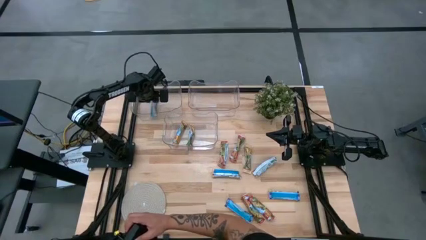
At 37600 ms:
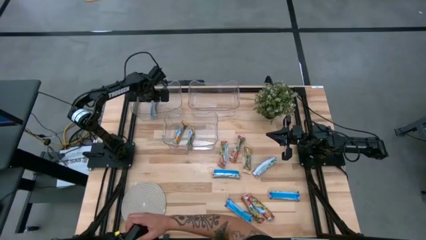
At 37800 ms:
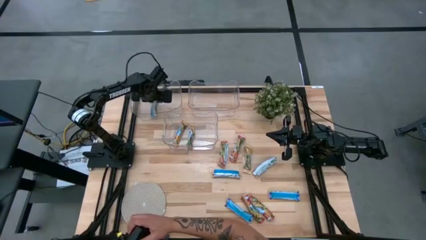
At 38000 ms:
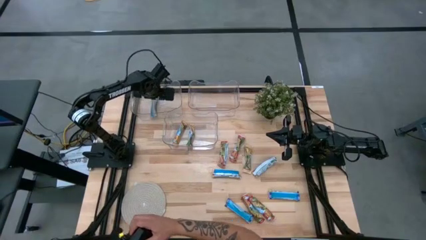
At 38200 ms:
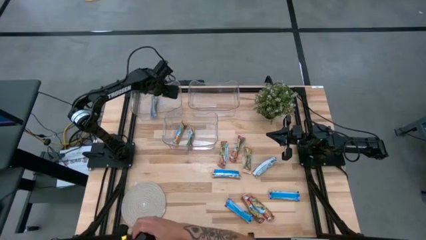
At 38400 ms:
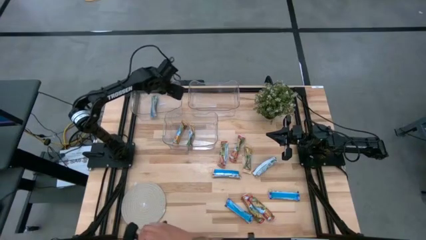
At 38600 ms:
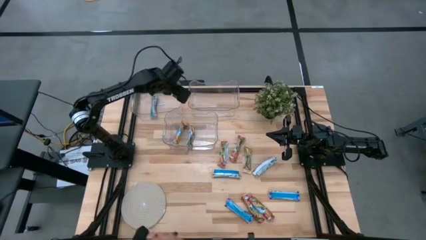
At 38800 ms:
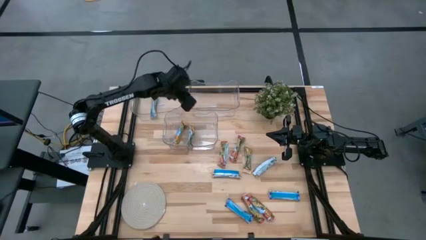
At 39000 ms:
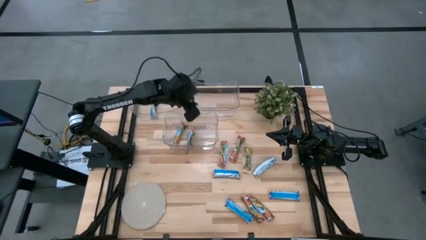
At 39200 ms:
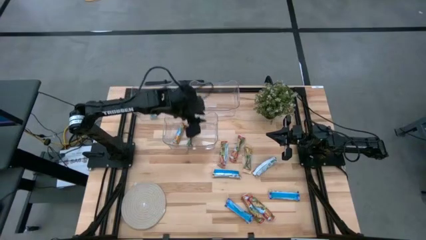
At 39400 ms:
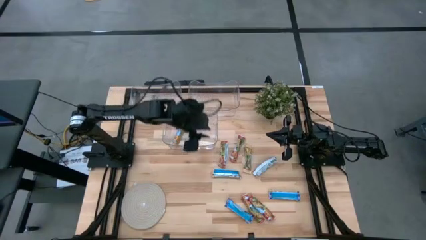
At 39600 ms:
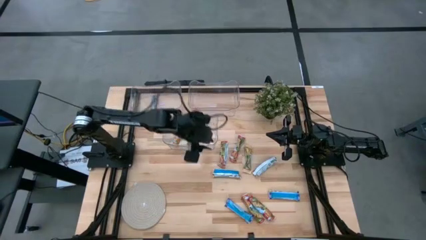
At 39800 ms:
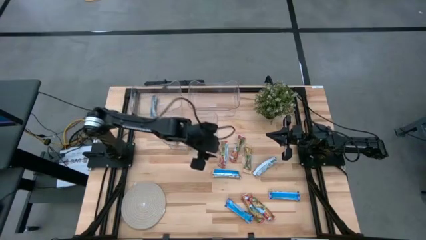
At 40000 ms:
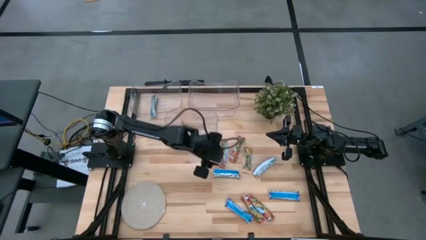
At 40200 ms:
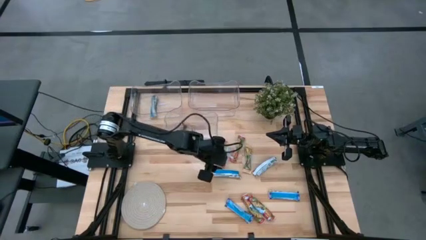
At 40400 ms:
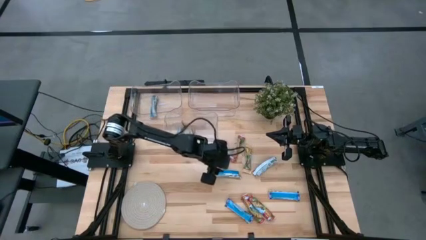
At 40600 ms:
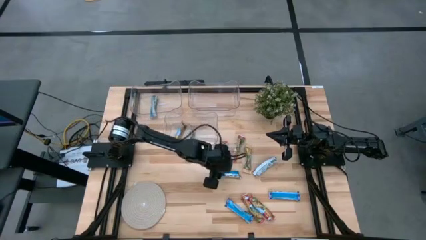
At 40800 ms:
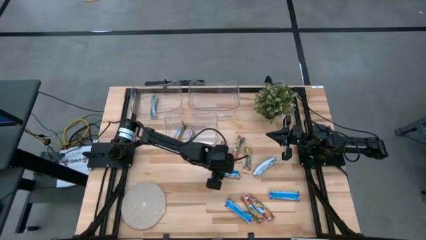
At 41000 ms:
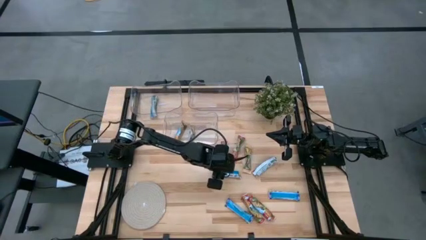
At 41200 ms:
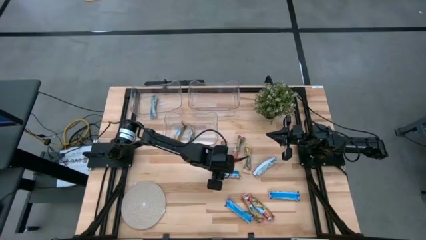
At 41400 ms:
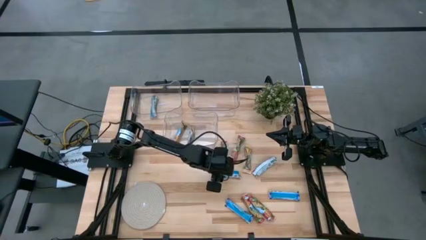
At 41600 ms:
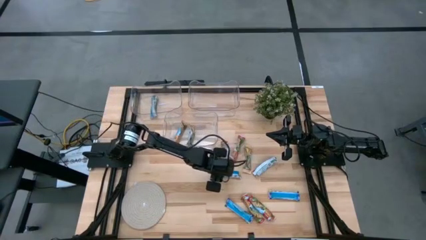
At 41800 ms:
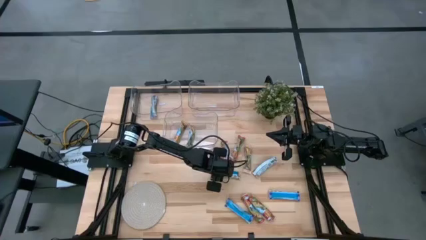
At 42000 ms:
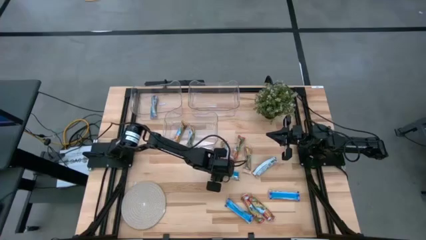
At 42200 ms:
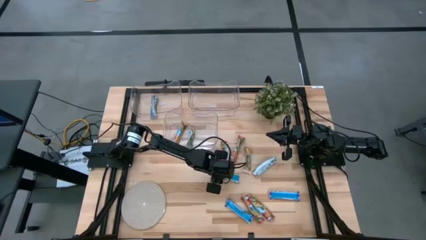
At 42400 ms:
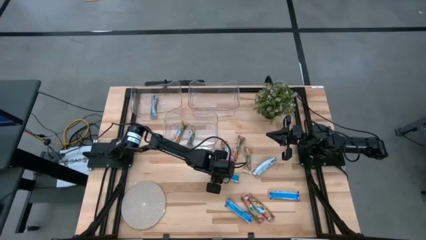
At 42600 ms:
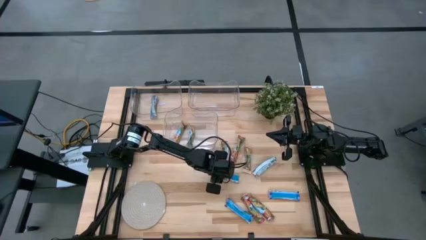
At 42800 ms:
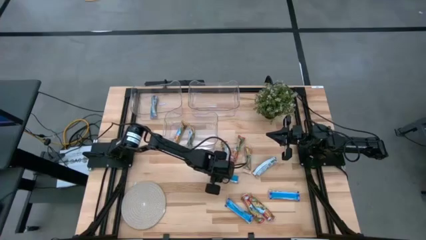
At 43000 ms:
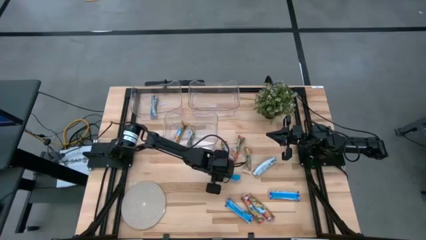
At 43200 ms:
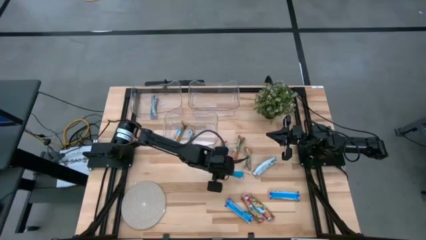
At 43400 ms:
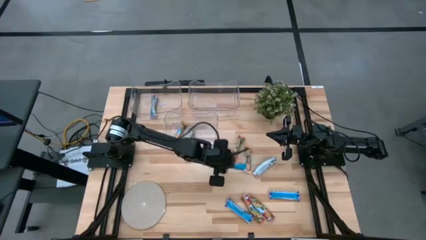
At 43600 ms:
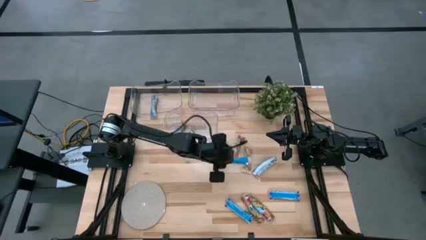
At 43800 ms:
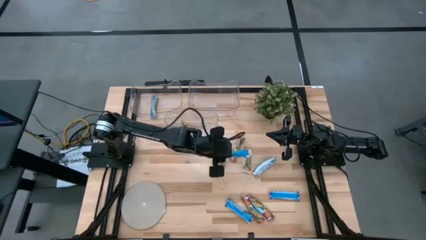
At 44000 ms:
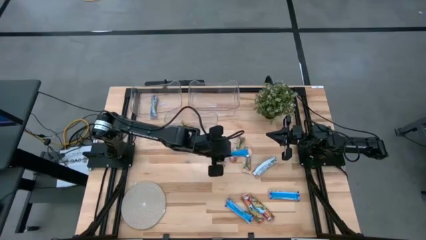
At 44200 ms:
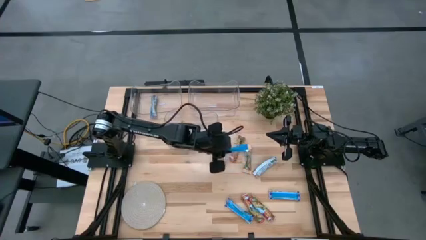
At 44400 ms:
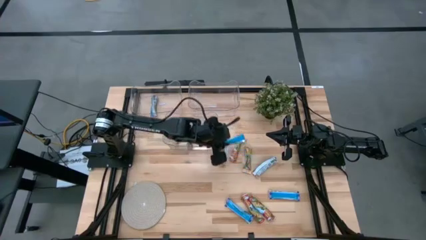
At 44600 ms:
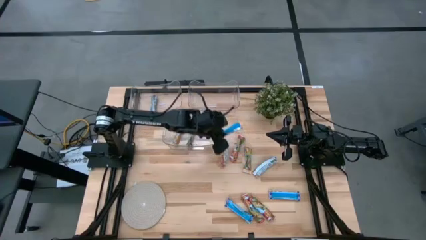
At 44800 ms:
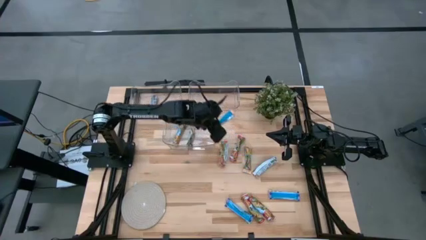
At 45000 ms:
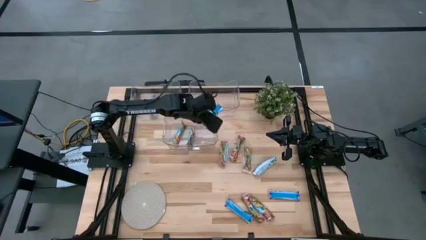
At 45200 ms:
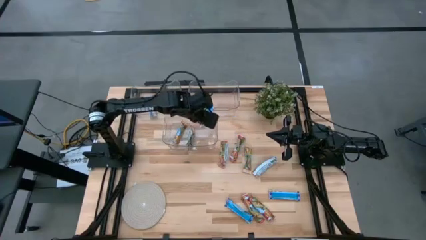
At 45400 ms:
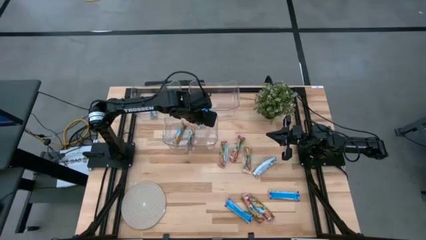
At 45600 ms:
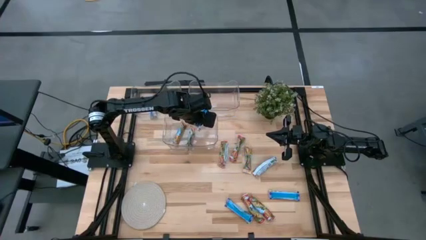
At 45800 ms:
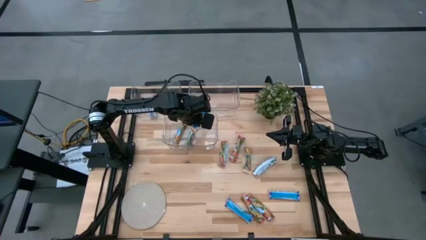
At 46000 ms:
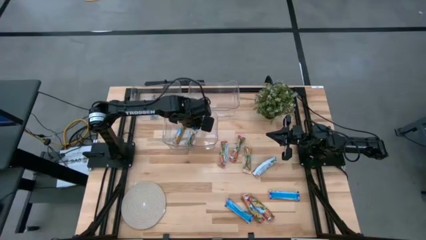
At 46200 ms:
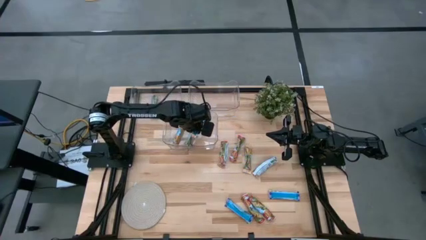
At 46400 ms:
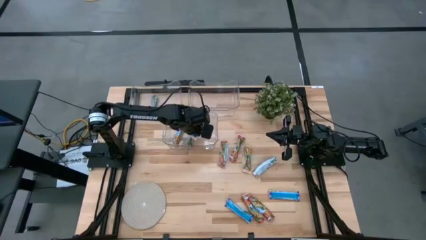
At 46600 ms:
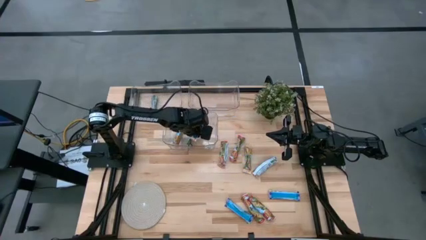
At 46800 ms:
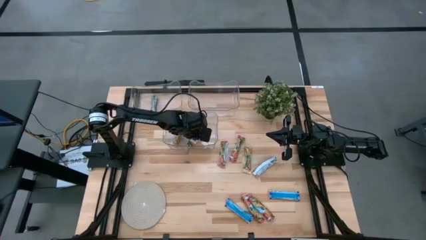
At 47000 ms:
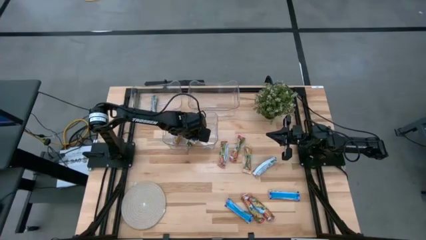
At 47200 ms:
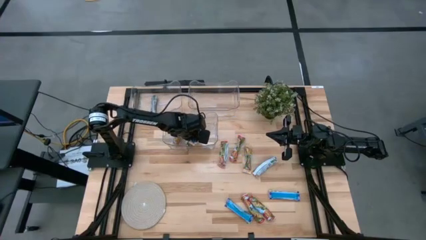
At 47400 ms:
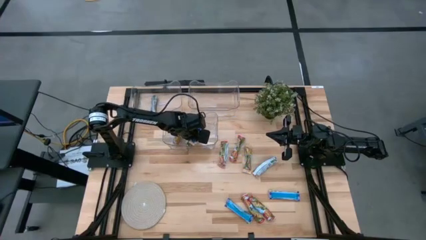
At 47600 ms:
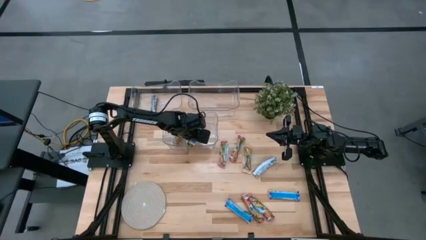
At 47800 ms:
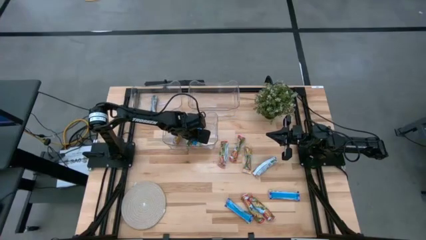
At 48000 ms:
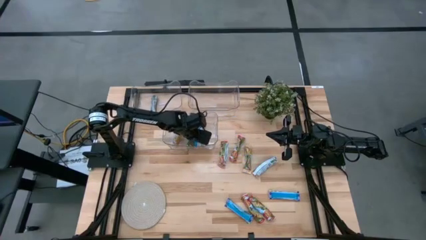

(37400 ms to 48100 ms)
Task: Pick and place Granola Bars by type
Put the orange granola bar into the bottom transparent bin
